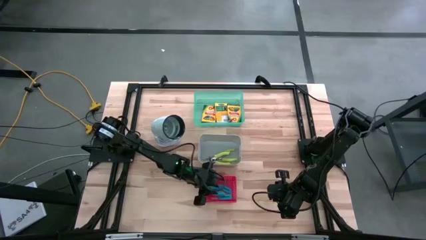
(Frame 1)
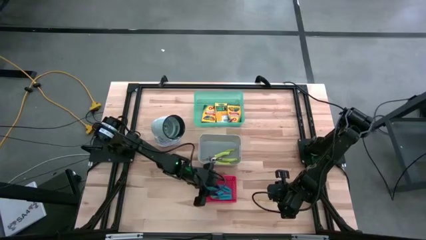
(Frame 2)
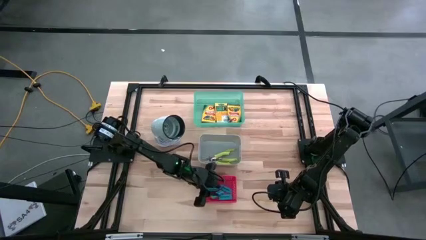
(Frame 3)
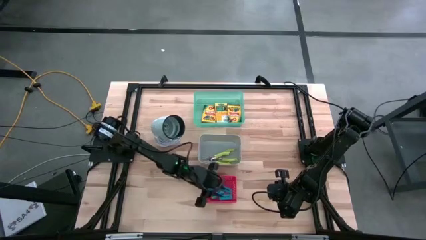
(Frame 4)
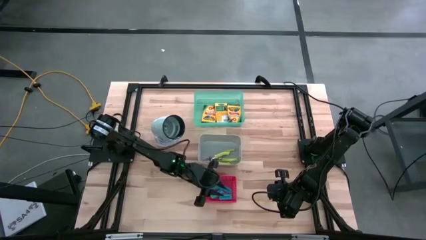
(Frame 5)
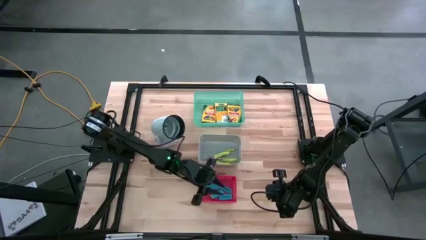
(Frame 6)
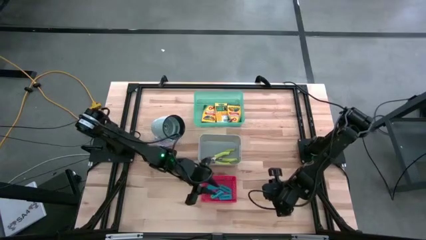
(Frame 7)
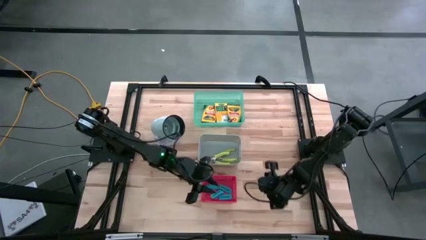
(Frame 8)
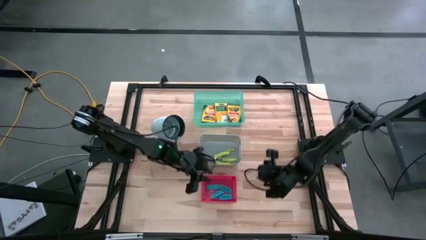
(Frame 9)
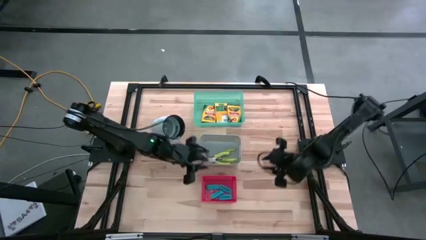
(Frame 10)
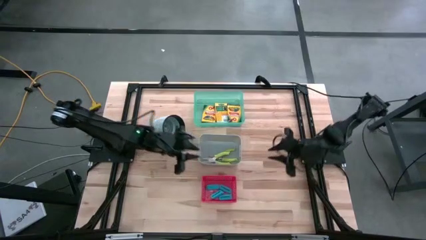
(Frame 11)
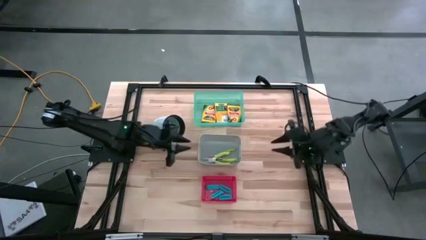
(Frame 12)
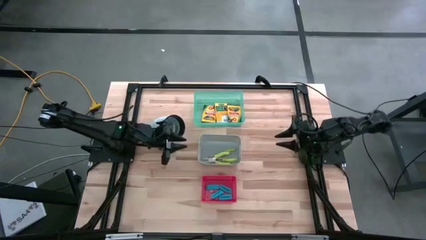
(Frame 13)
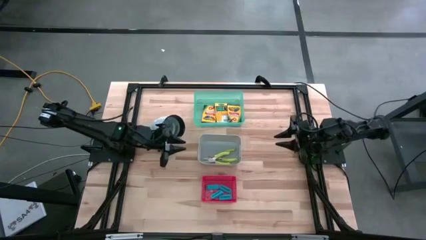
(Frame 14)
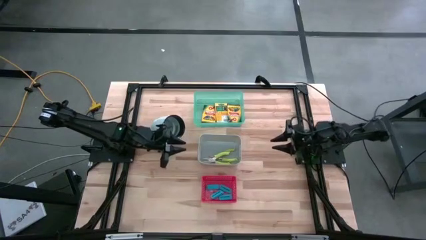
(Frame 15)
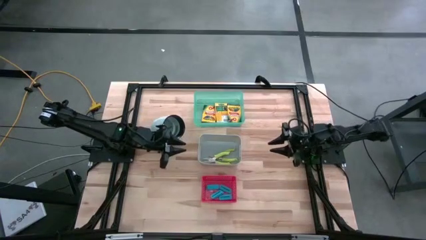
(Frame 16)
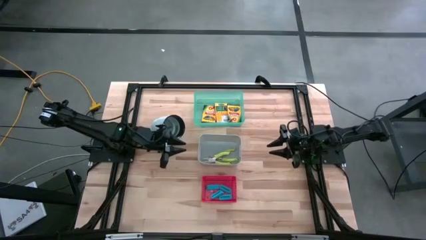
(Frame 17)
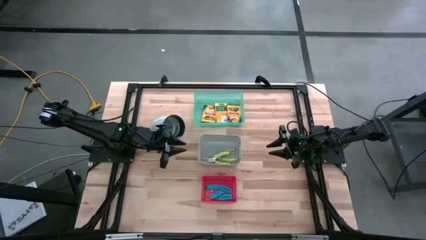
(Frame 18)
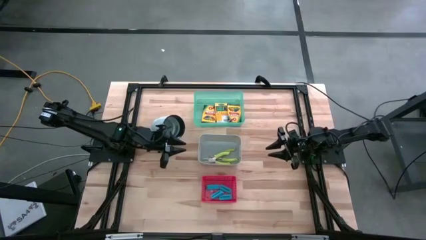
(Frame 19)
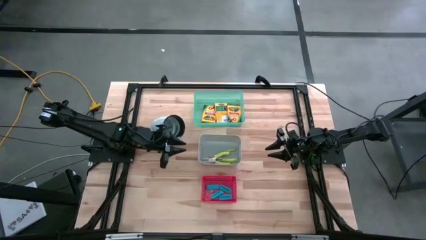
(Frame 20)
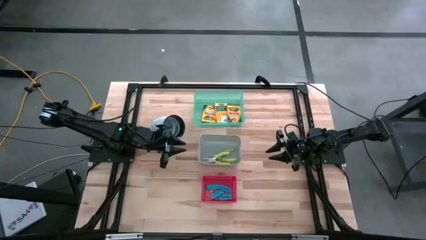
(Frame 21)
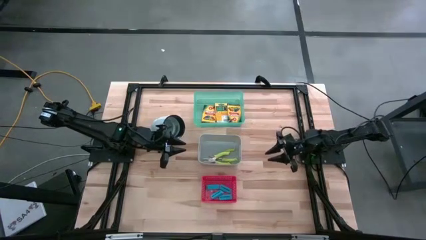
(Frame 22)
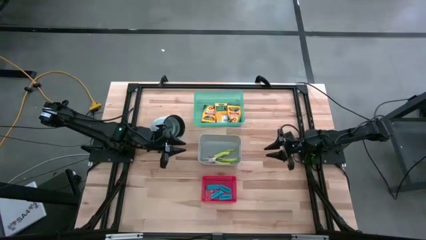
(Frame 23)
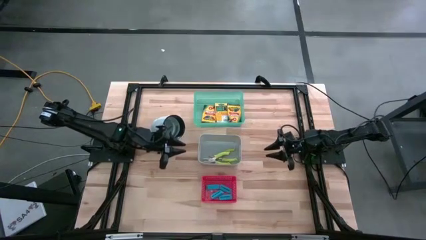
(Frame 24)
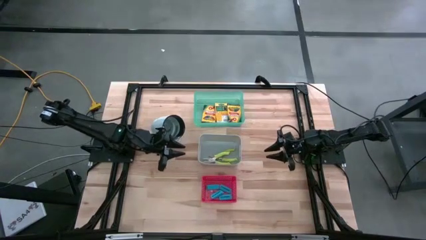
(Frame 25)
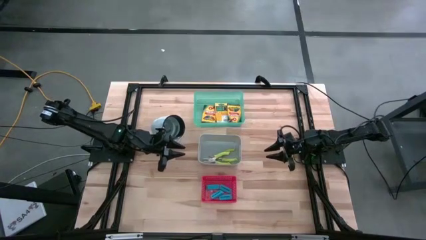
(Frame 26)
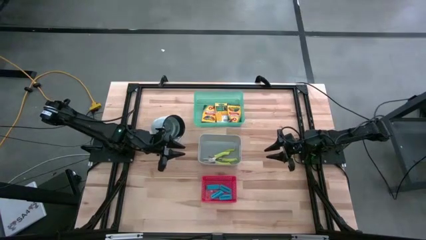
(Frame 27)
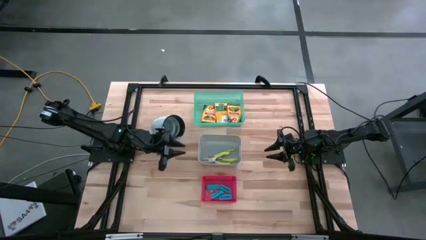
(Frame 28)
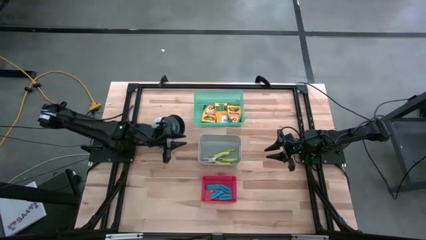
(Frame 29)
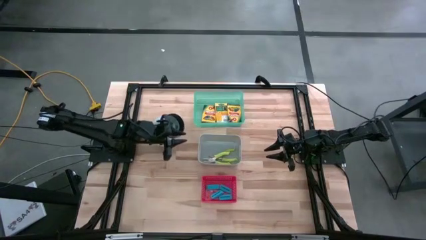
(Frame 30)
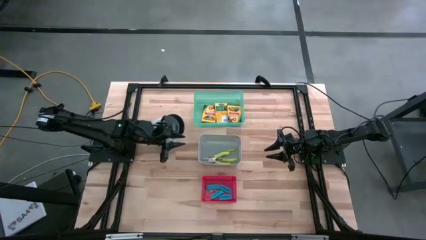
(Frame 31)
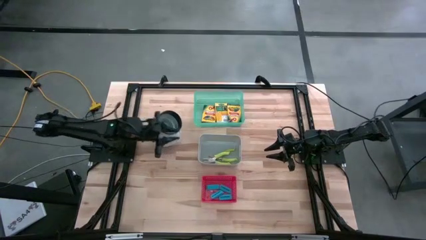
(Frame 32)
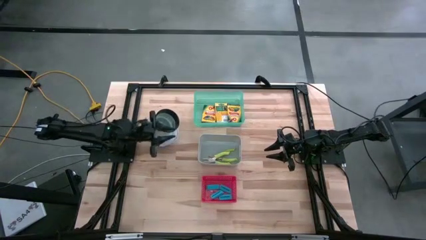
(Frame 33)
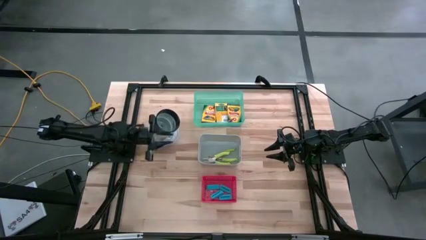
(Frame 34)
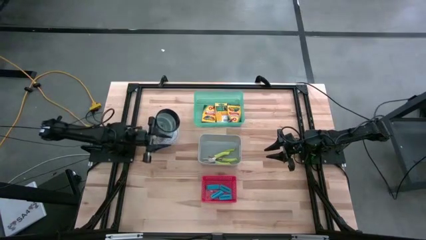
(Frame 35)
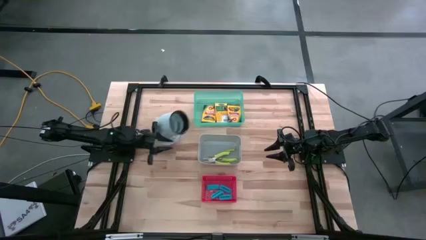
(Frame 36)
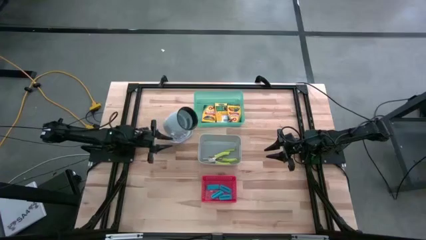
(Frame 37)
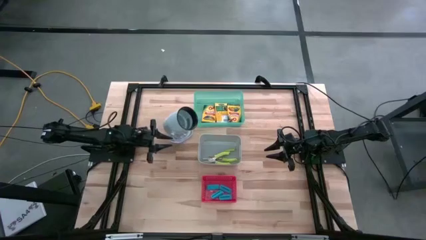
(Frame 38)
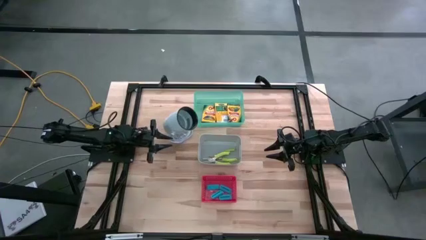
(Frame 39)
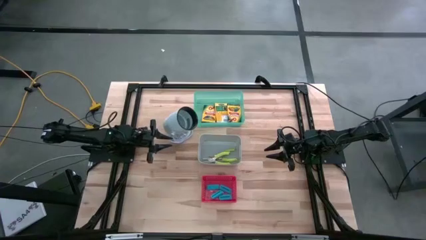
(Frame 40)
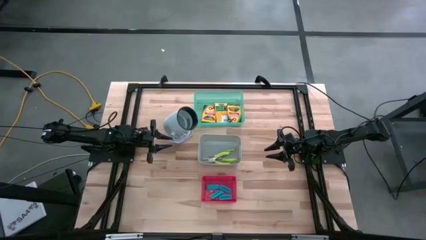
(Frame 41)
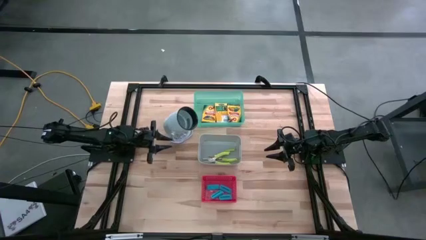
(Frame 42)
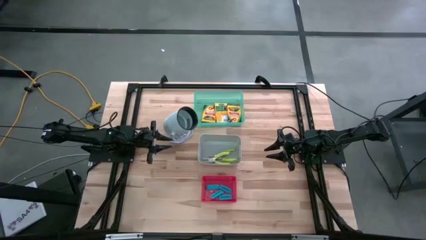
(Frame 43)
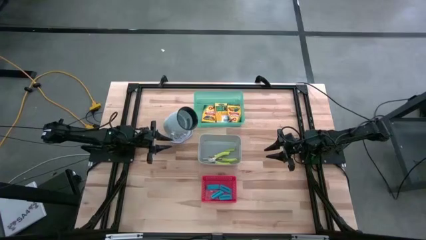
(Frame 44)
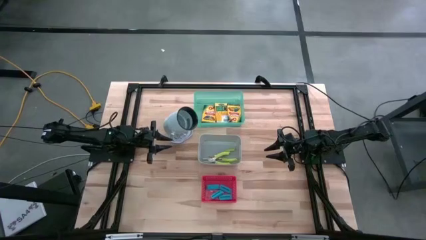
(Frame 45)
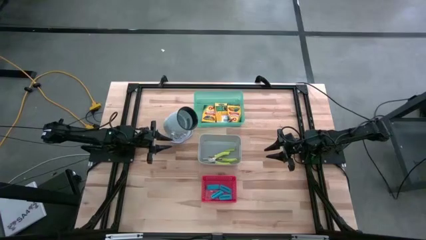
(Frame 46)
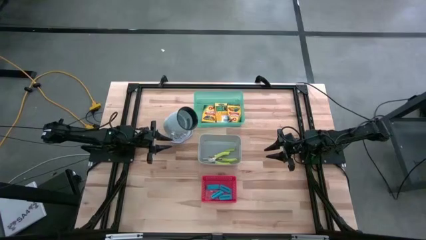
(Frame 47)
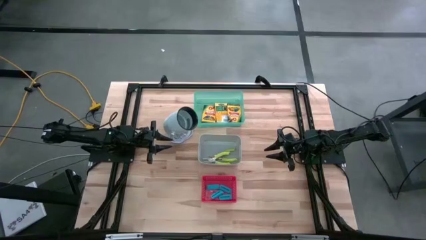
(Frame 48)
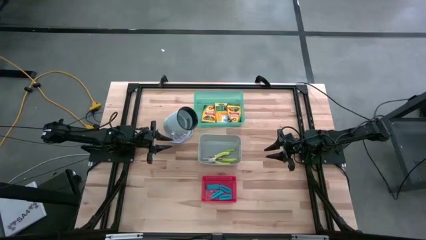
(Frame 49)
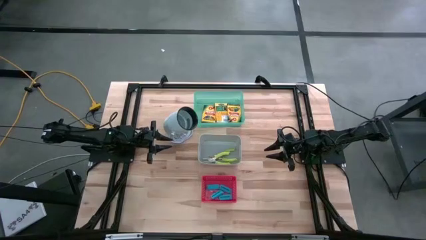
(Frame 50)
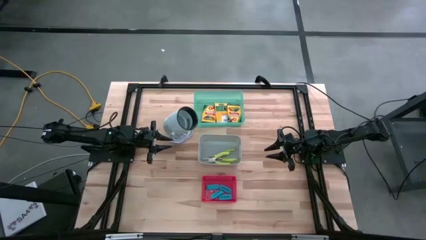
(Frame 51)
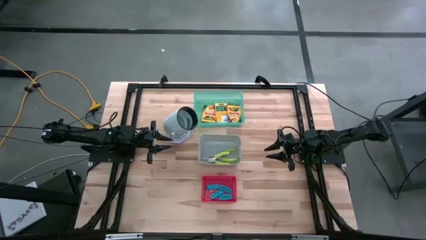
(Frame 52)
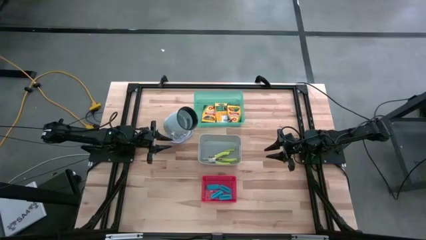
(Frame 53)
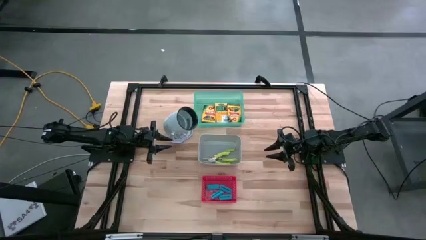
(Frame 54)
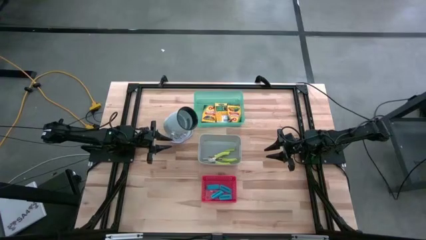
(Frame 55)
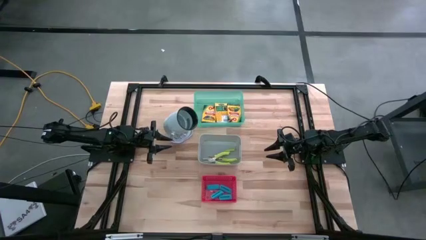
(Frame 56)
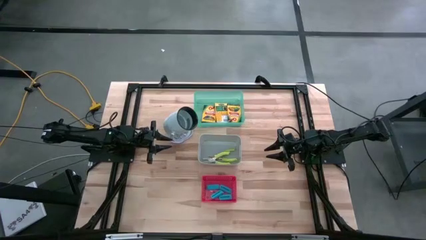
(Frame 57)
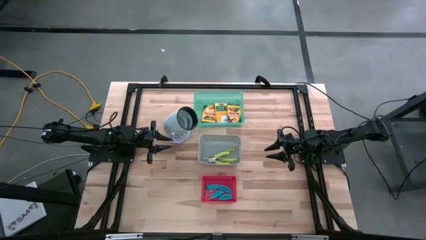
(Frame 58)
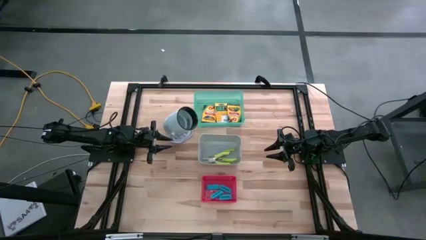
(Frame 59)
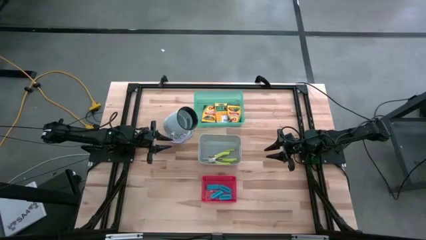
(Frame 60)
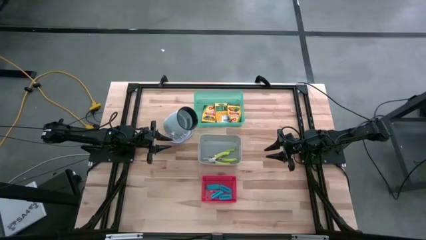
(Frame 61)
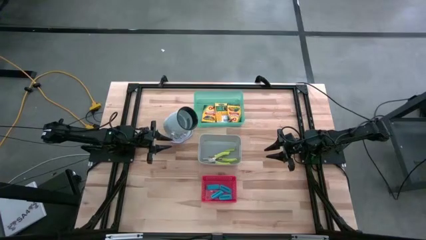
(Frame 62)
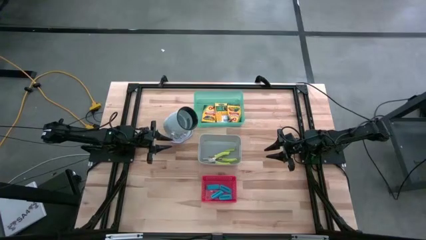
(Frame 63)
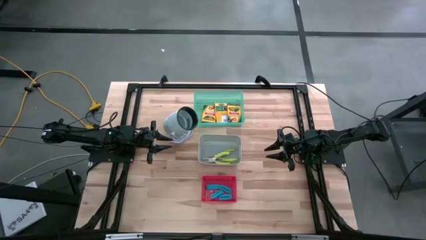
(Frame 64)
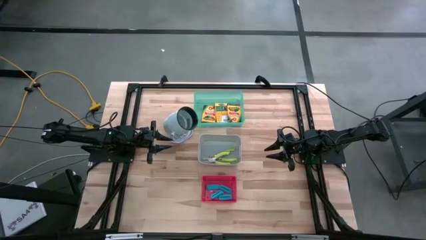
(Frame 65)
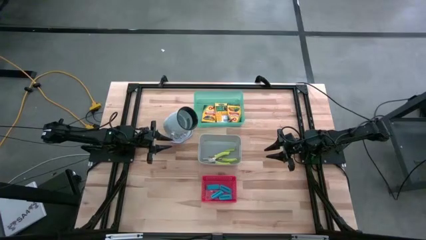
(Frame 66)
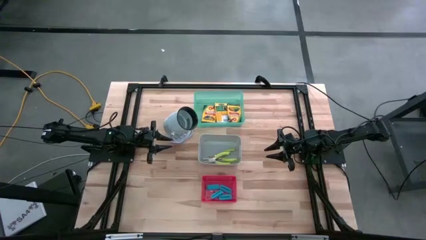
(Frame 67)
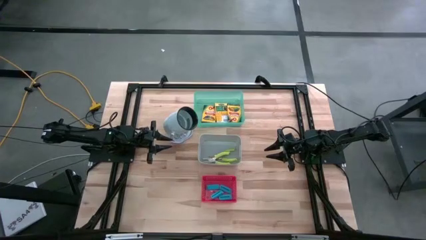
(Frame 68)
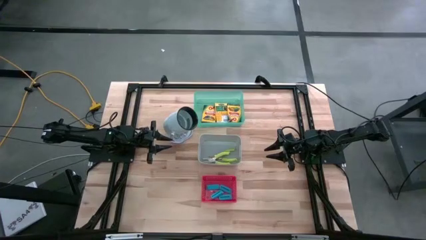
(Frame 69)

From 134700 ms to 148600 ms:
Task: Pick & Place School Supplies
Return to Home Position
